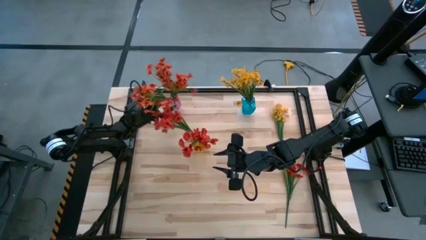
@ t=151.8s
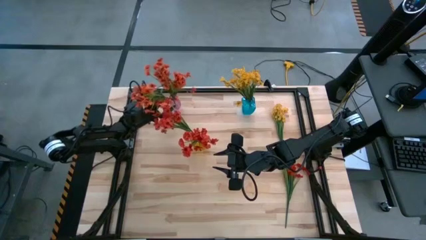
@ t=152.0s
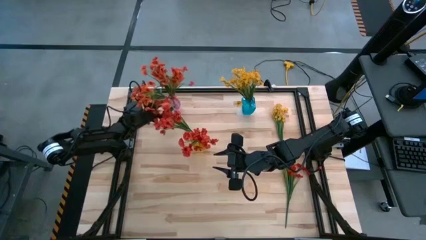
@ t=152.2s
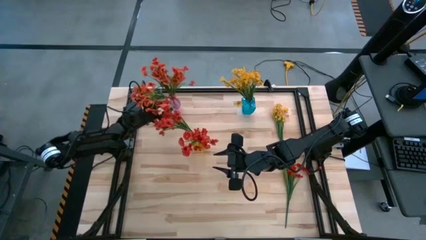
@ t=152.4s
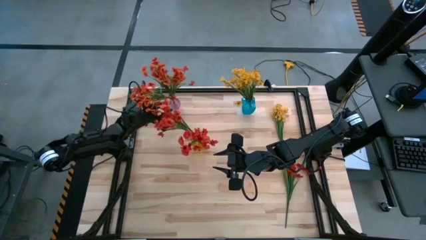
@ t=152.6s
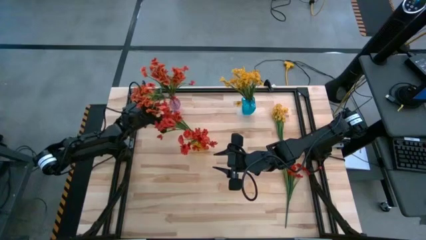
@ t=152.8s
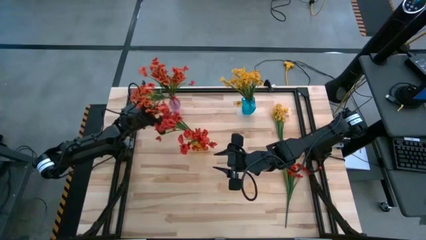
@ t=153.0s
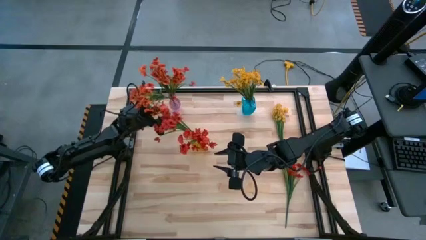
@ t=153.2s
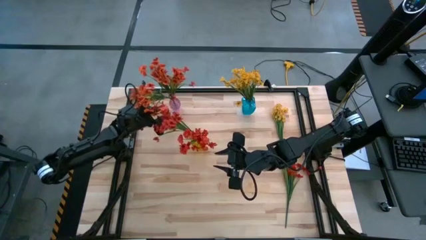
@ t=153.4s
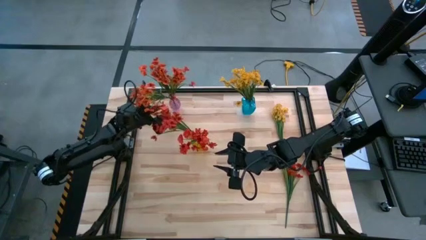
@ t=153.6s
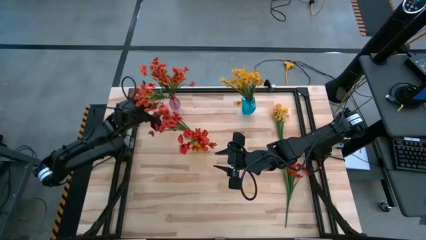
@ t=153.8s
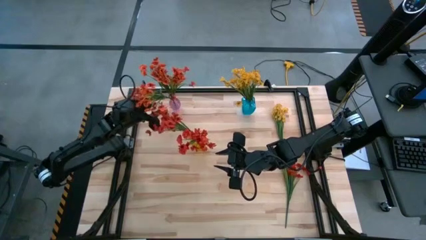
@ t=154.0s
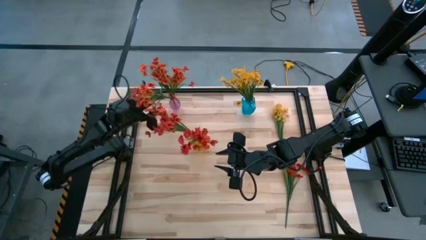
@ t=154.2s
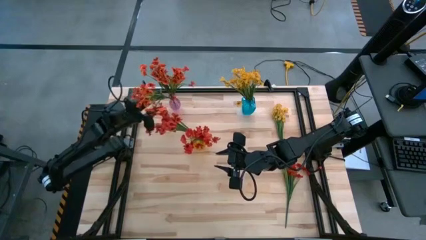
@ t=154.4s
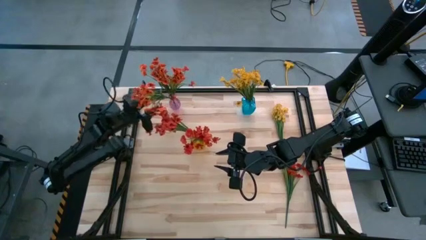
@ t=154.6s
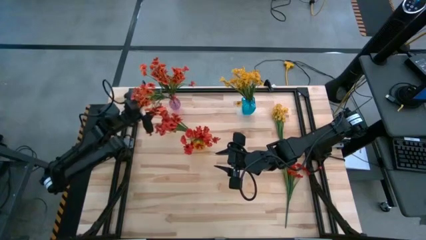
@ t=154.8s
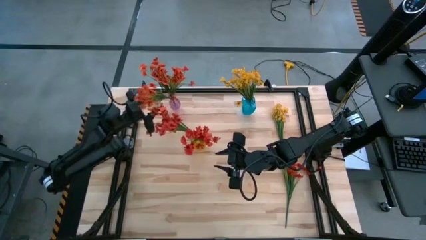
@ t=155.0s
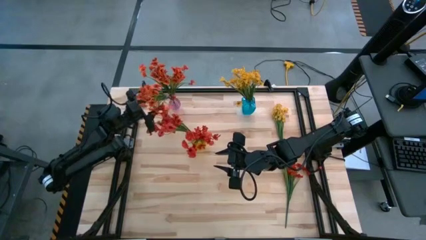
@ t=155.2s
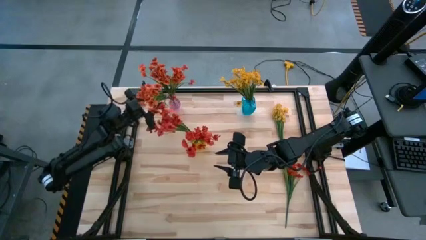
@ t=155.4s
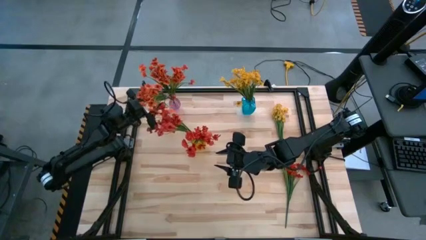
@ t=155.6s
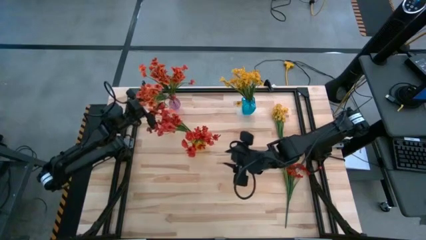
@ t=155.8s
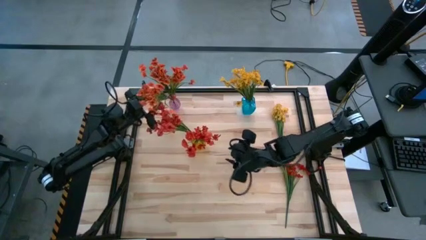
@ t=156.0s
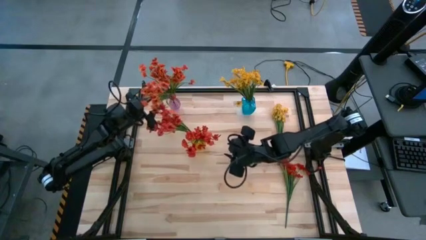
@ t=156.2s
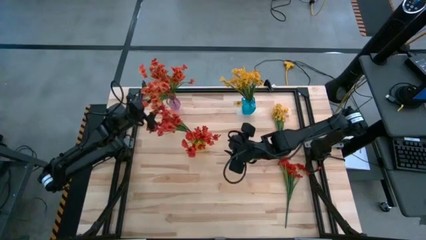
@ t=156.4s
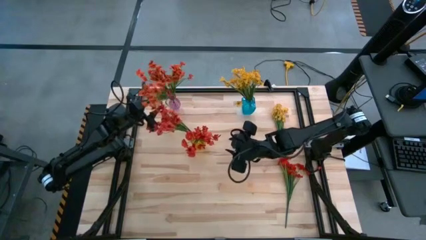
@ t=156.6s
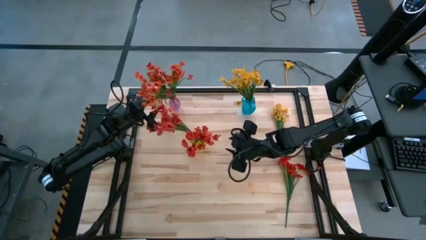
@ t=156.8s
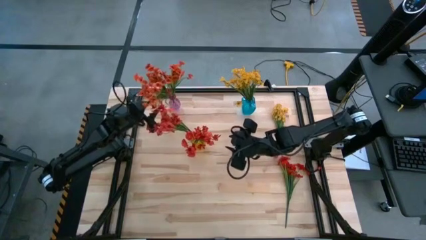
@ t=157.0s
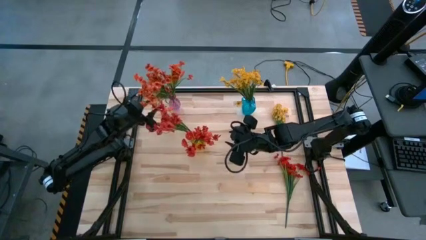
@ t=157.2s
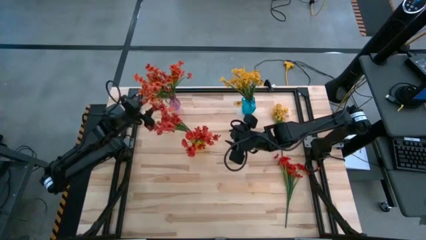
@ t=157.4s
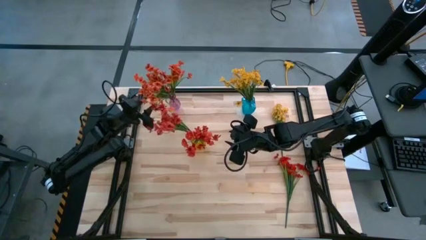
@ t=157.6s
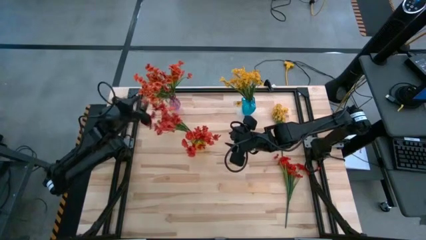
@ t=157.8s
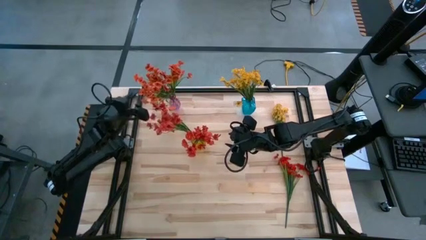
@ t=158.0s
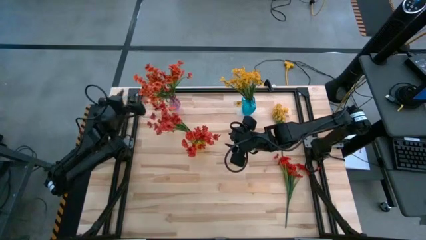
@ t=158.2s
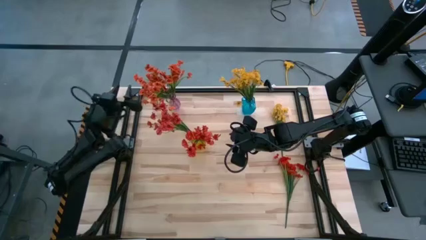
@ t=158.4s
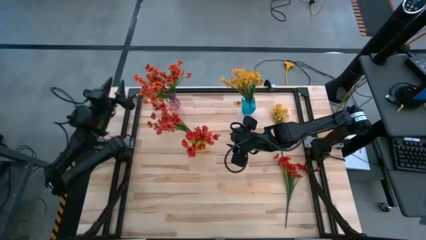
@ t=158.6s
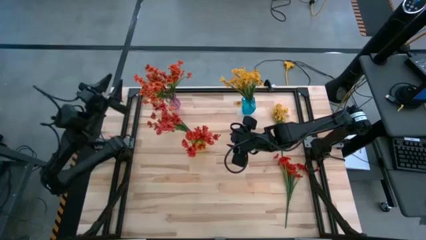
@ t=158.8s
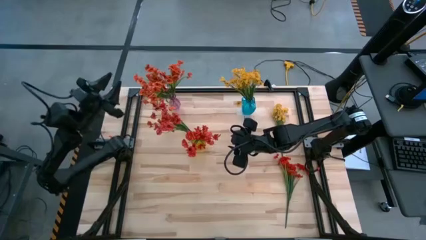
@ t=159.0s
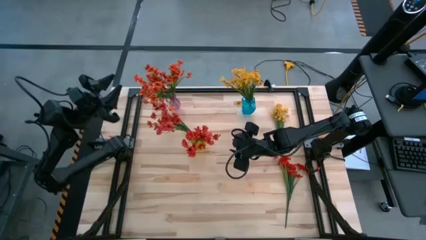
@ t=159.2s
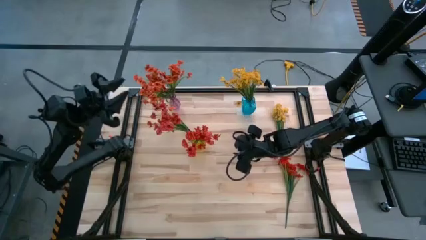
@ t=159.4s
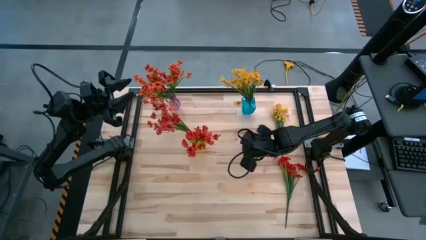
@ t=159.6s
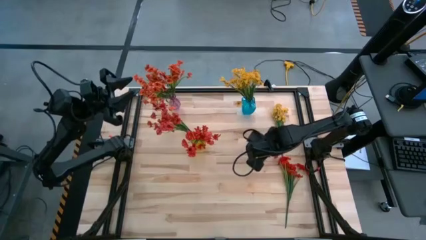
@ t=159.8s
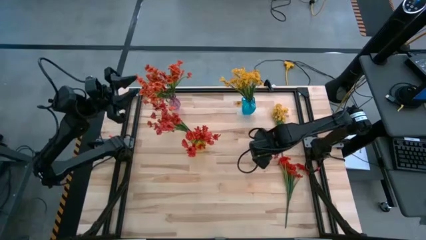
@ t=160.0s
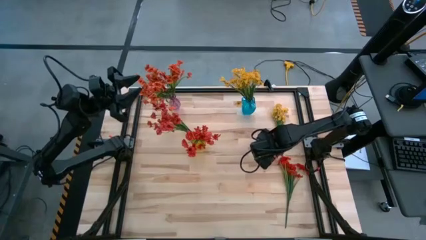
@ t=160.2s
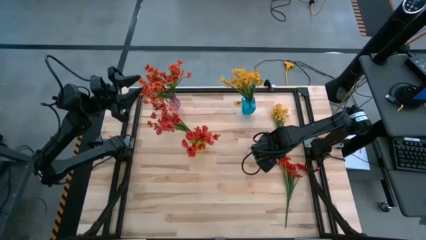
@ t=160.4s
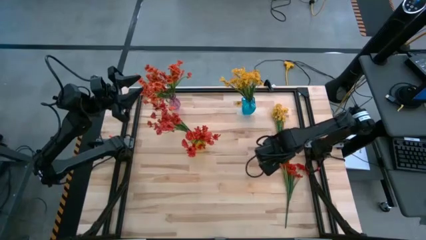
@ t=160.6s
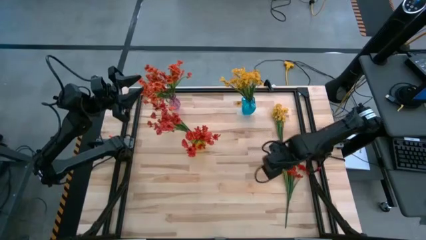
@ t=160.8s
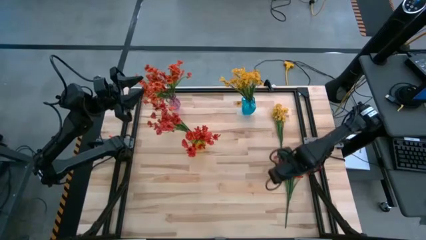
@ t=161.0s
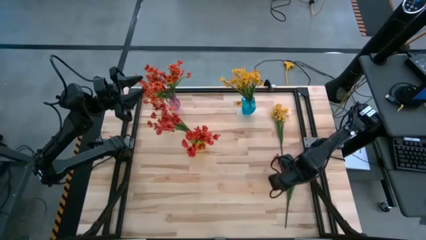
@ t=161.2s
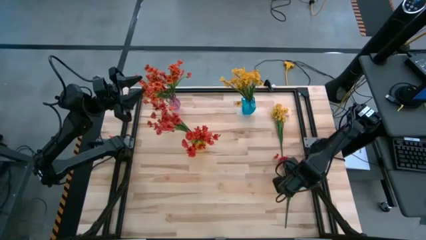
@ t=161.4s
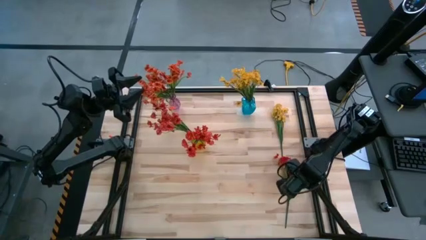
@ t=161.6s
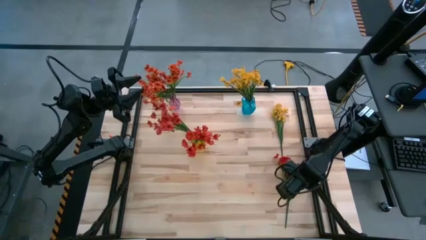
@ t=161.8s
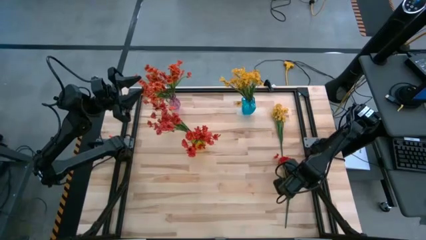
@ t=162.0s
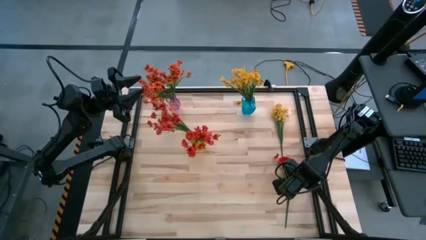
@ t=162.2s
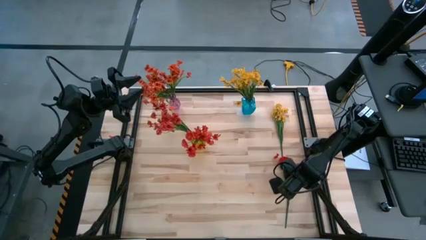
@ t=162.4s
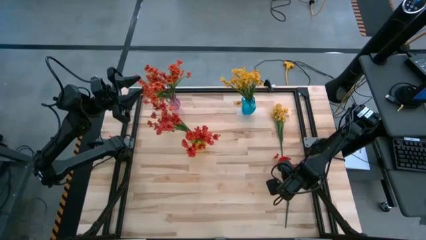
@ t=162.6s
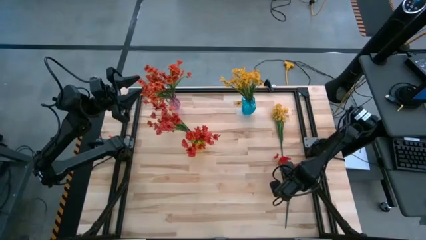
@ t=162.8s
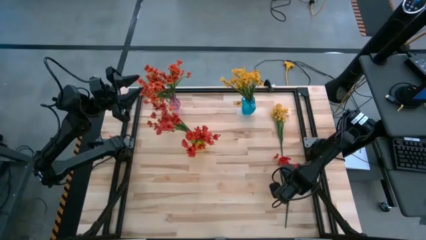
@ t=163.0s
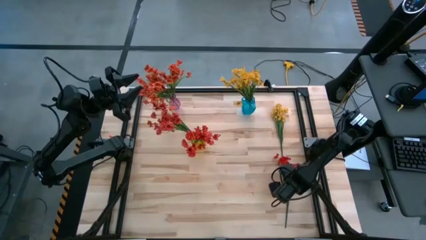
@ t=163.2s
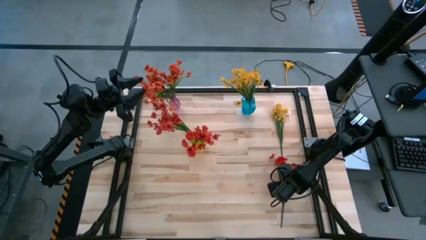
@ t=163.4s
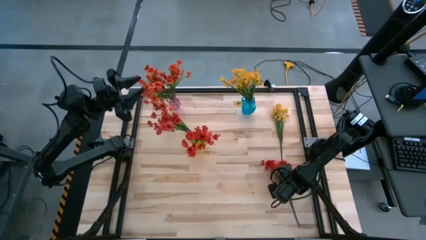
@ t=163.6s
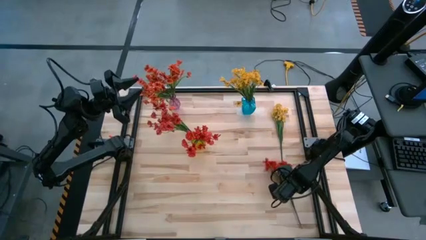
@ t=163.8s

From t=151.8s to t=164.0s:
Task: Sort flowers into vase by color
Put the red flower into the yellow vase

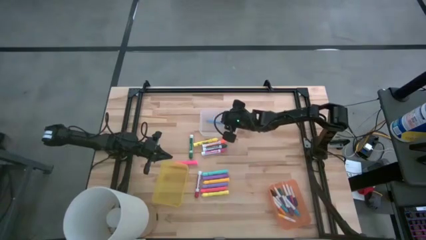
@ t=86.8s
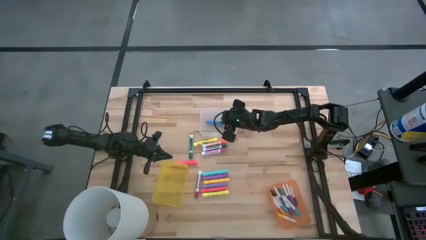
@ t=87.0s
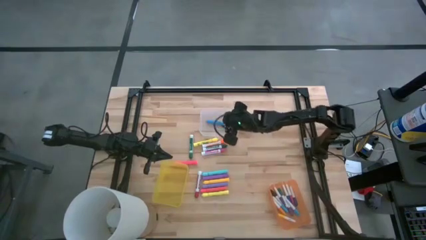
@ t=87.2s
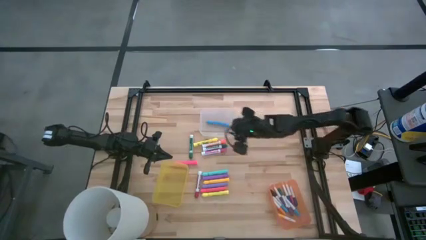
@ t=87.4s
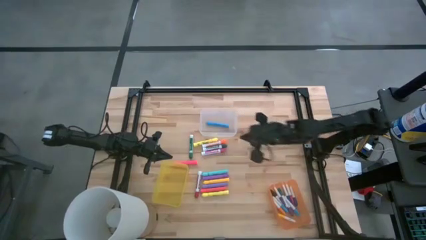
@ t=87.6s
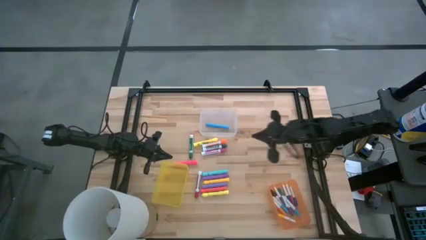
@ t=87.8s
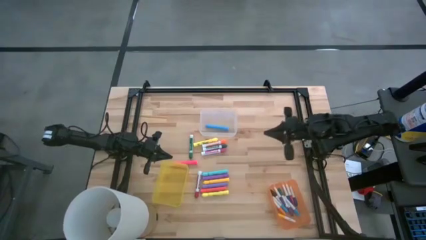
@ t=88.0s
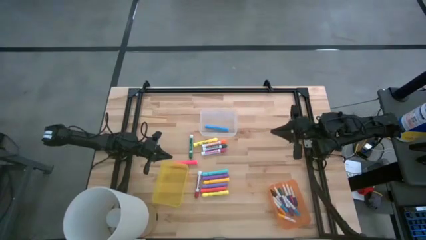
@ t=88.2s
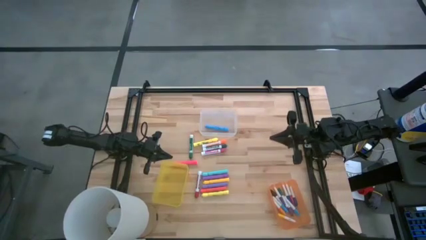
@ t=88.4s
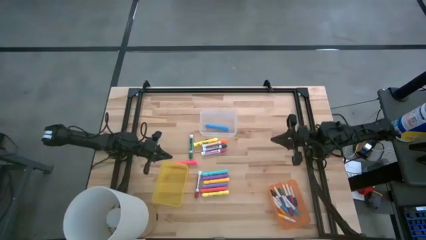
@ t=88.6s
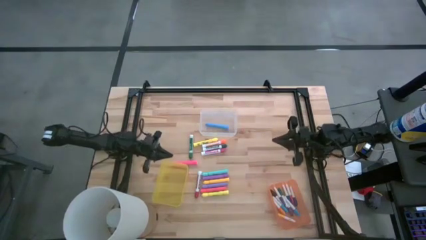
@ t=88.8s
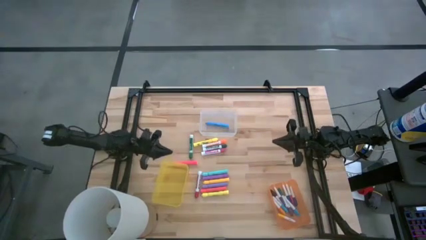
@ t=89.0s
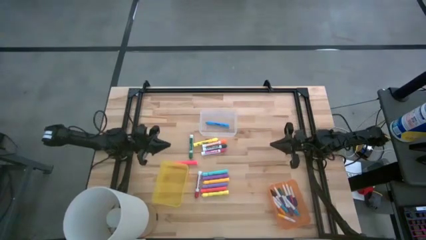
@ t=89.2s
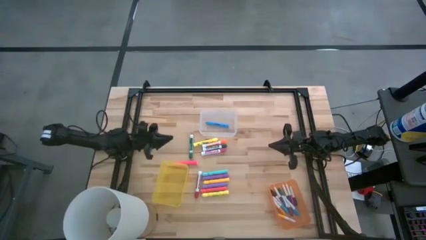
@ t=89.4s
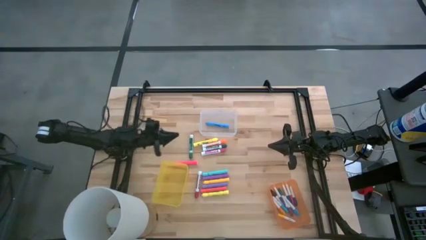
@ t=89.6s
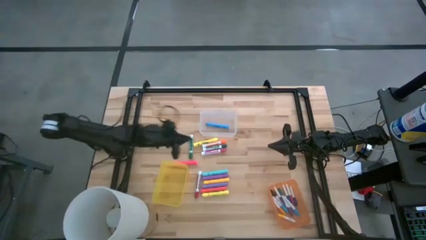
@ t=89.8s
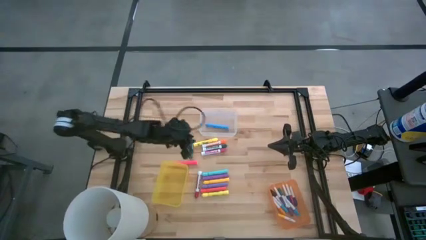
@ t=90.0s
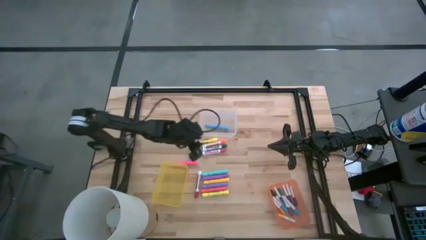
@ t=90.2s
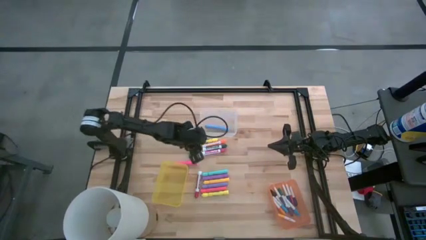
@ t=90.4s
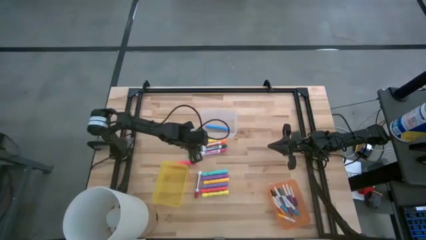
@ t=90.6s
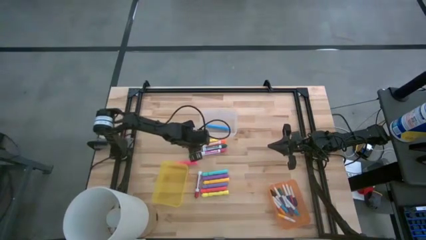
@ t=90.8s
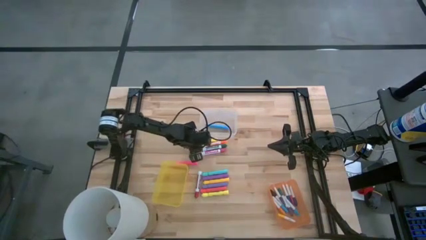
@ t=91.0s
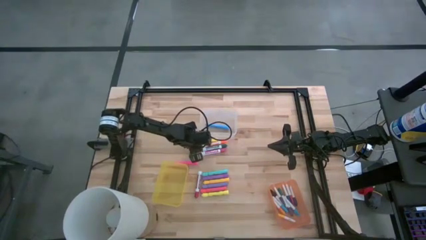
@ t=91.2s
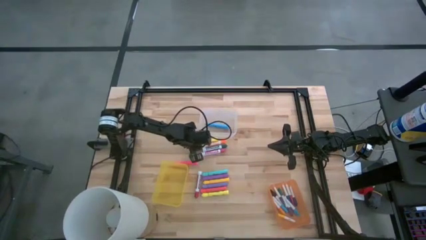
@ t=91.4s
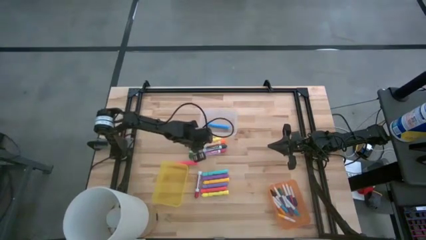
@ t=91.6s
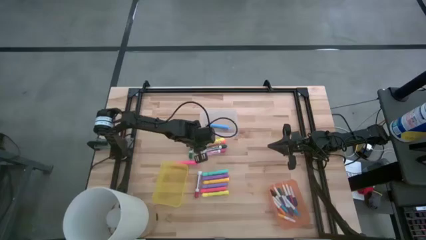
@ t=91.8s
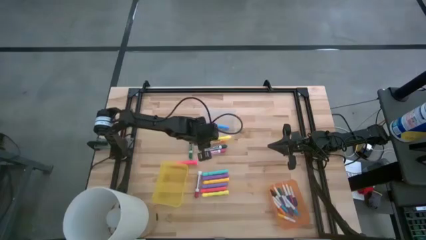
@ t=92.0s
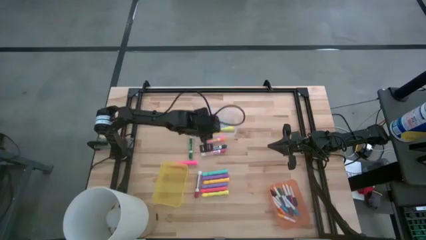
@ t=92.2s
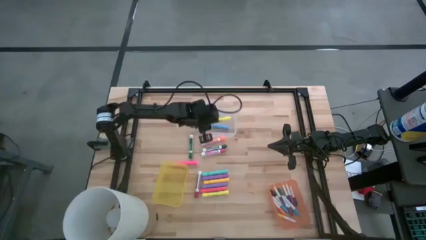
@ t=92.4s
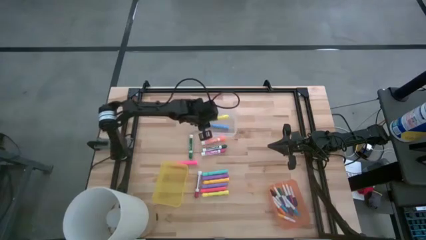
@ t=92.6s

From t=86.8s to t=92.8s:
Task: Pick & Place Markers
Put the top large yellow highlighter pen into the transparent bin
